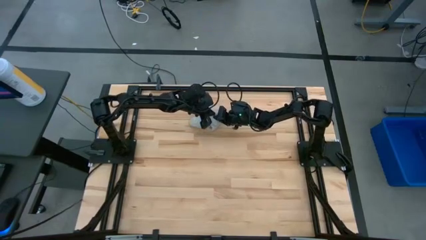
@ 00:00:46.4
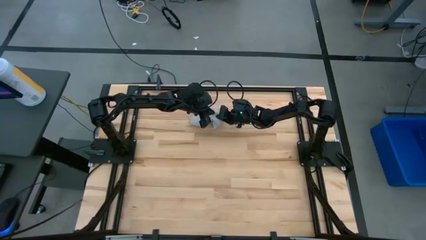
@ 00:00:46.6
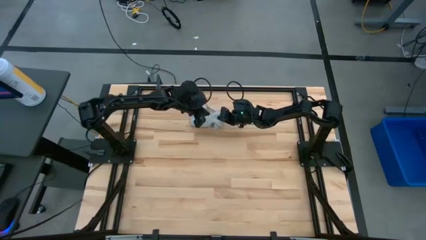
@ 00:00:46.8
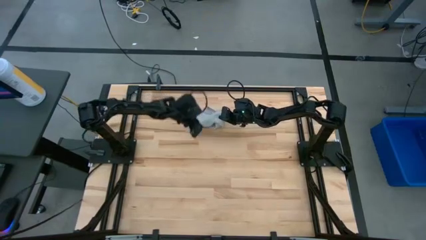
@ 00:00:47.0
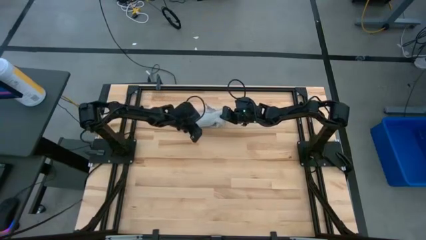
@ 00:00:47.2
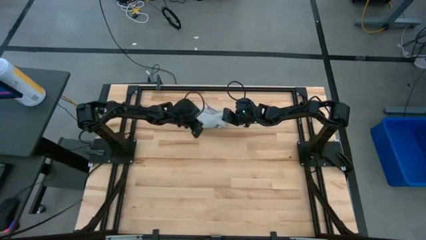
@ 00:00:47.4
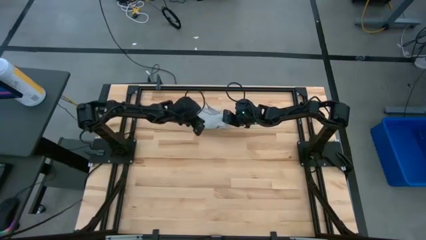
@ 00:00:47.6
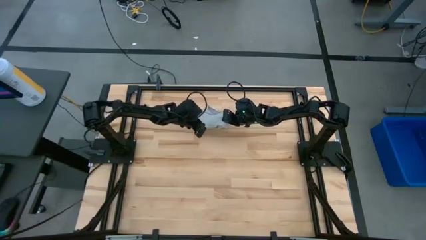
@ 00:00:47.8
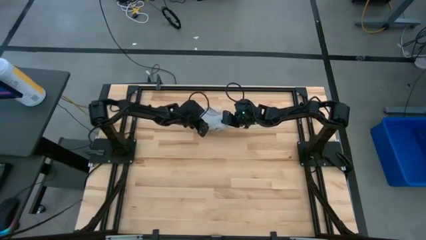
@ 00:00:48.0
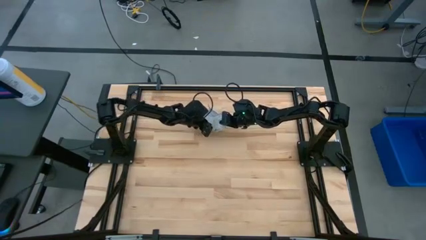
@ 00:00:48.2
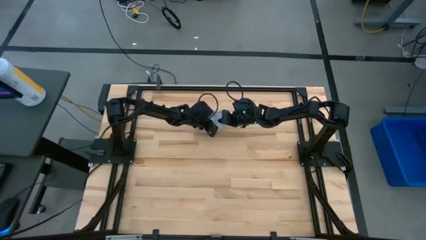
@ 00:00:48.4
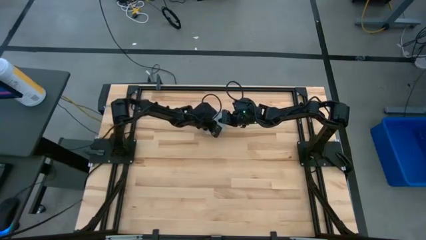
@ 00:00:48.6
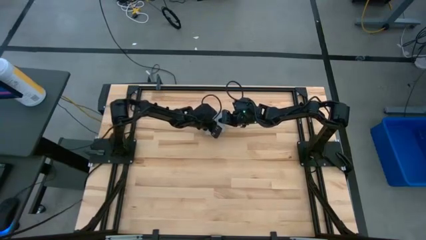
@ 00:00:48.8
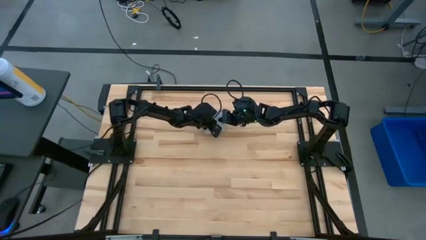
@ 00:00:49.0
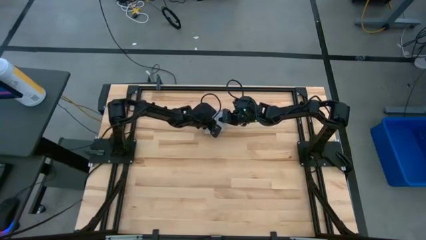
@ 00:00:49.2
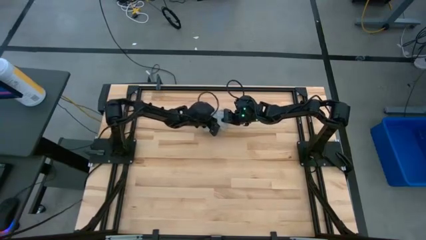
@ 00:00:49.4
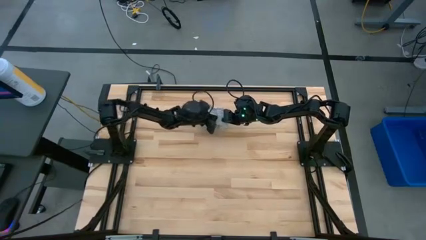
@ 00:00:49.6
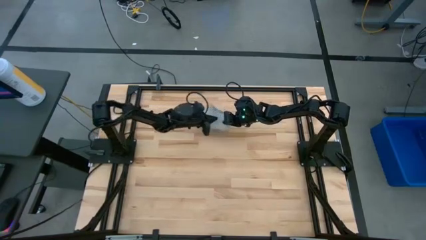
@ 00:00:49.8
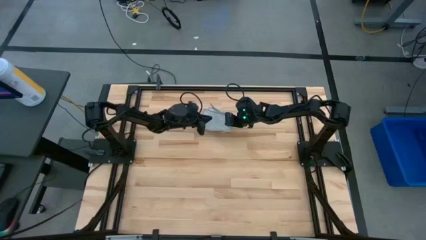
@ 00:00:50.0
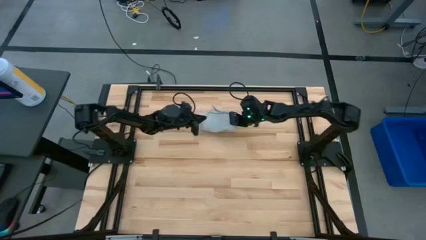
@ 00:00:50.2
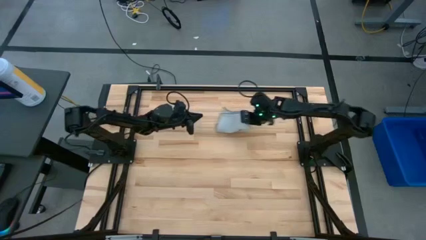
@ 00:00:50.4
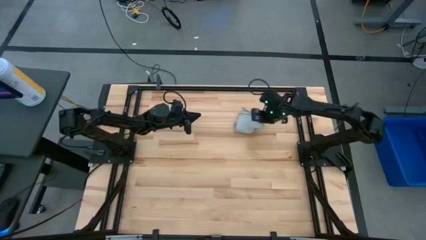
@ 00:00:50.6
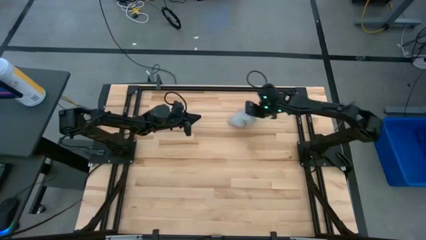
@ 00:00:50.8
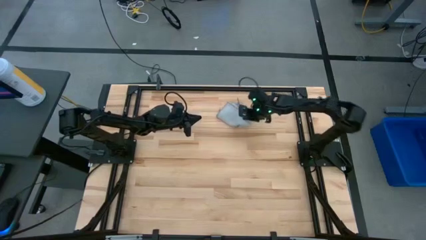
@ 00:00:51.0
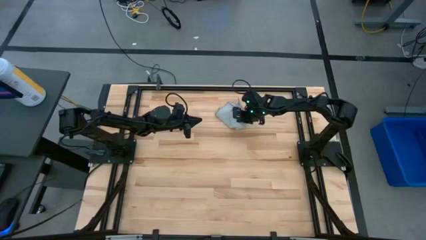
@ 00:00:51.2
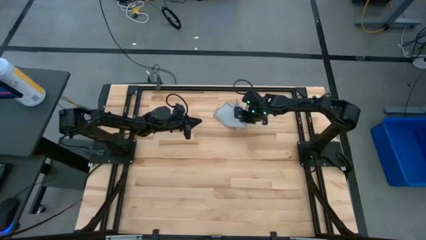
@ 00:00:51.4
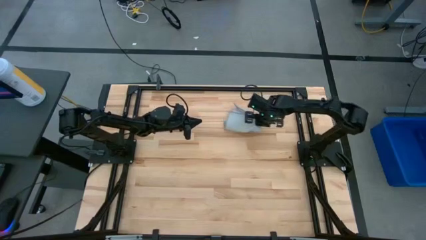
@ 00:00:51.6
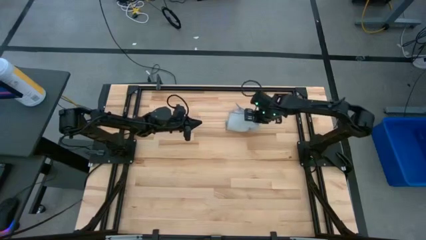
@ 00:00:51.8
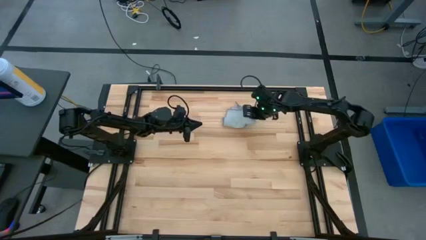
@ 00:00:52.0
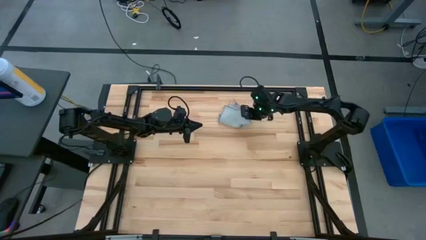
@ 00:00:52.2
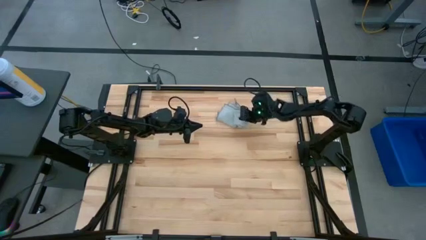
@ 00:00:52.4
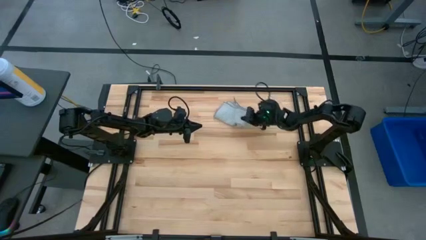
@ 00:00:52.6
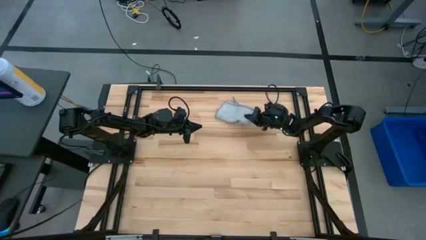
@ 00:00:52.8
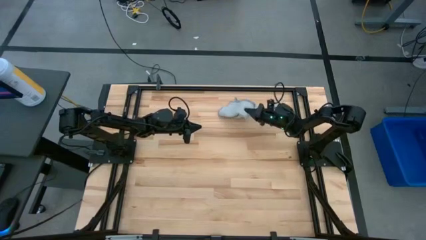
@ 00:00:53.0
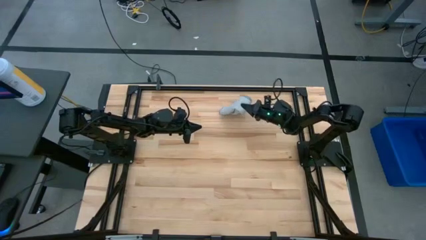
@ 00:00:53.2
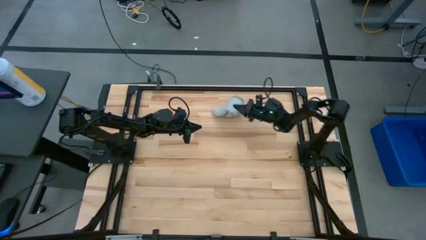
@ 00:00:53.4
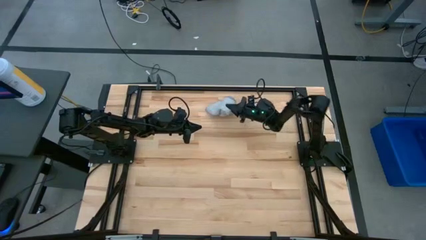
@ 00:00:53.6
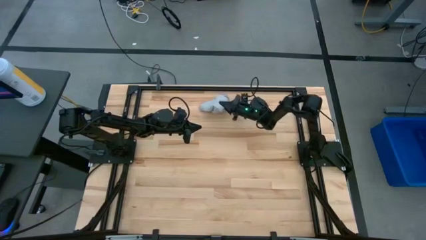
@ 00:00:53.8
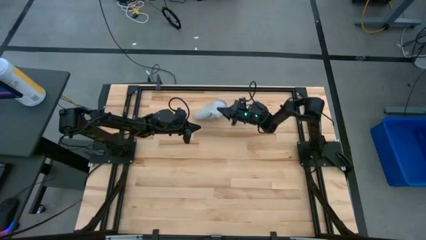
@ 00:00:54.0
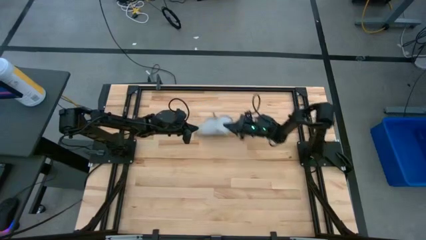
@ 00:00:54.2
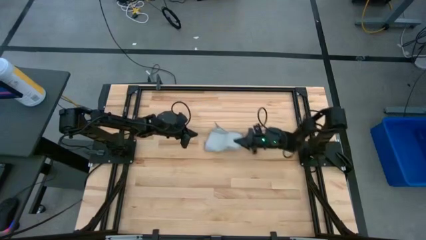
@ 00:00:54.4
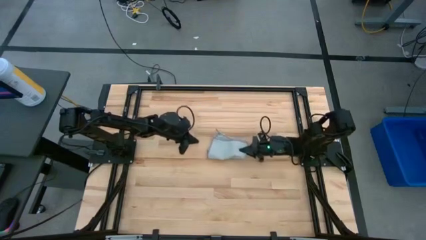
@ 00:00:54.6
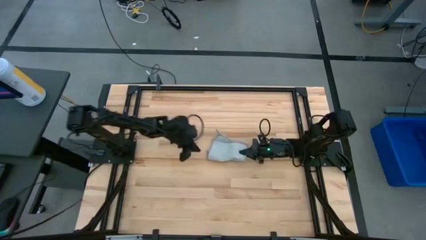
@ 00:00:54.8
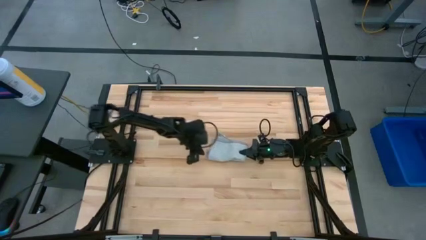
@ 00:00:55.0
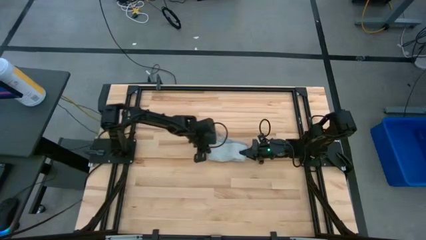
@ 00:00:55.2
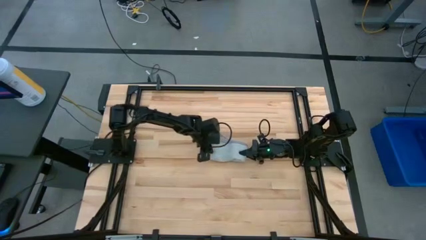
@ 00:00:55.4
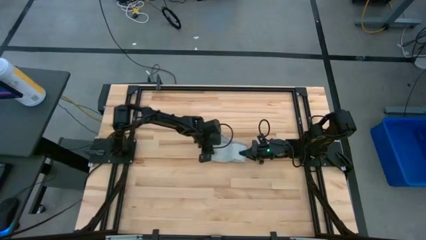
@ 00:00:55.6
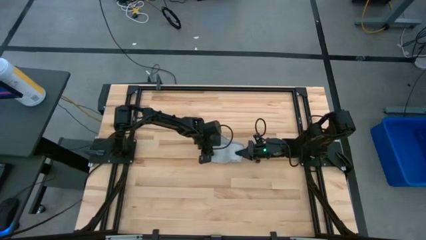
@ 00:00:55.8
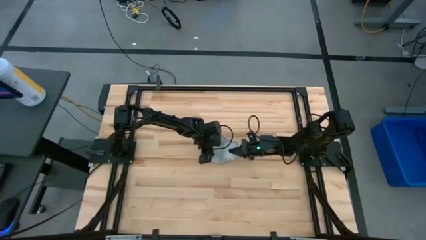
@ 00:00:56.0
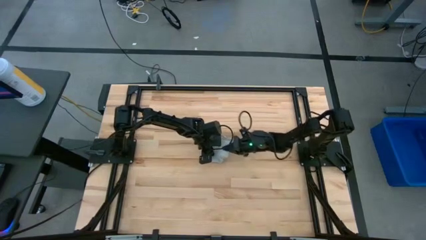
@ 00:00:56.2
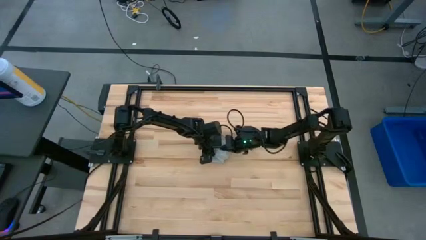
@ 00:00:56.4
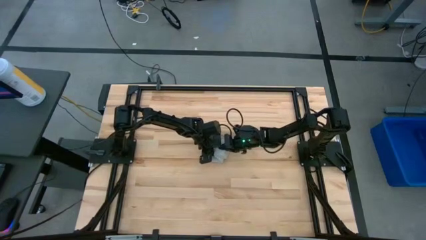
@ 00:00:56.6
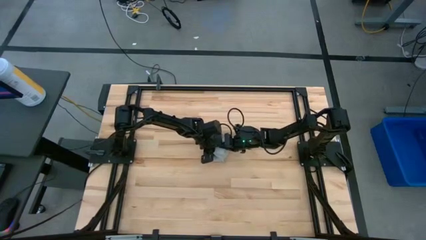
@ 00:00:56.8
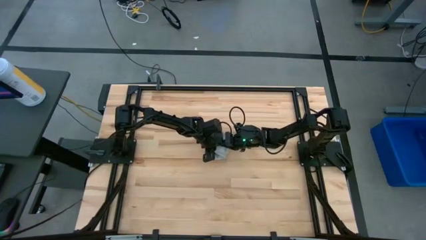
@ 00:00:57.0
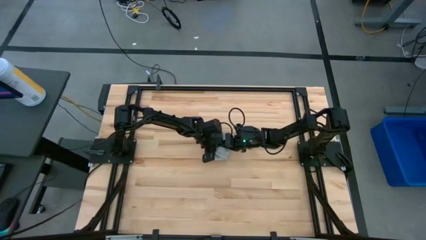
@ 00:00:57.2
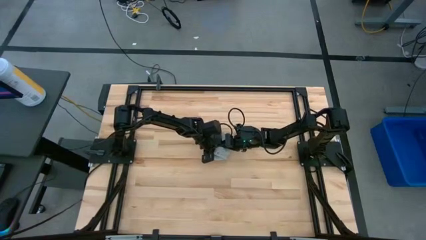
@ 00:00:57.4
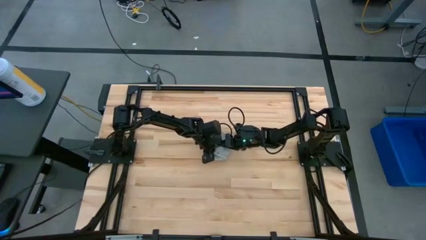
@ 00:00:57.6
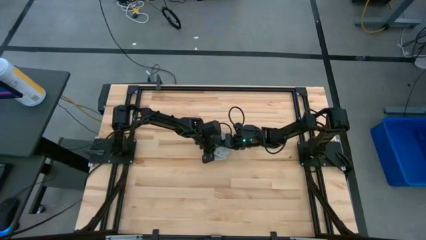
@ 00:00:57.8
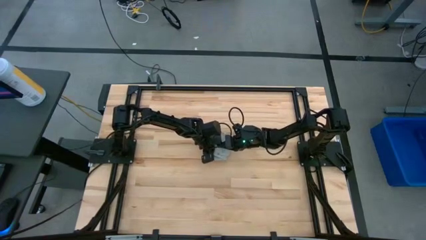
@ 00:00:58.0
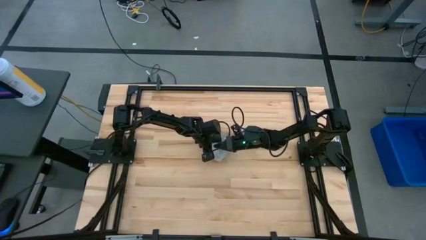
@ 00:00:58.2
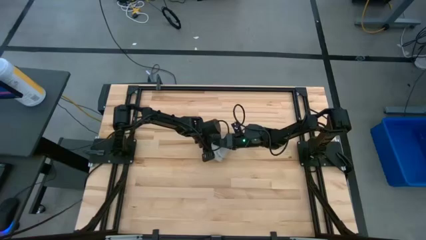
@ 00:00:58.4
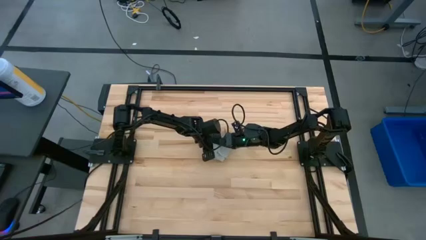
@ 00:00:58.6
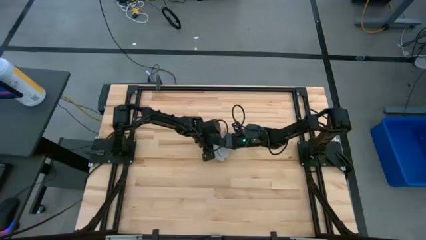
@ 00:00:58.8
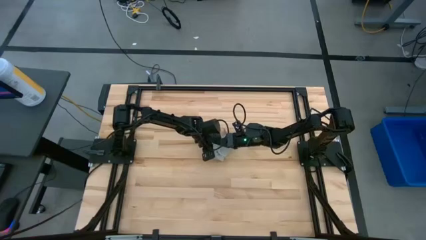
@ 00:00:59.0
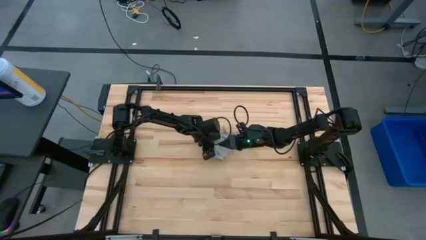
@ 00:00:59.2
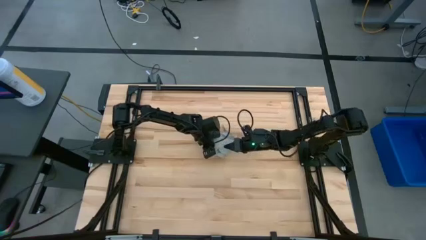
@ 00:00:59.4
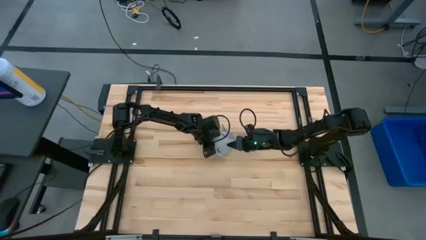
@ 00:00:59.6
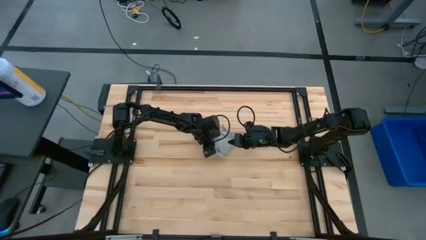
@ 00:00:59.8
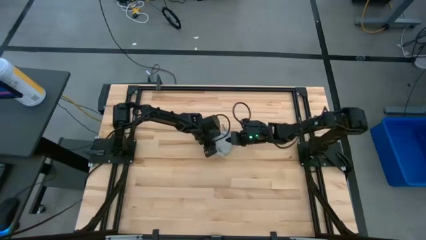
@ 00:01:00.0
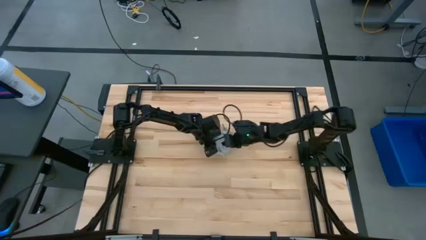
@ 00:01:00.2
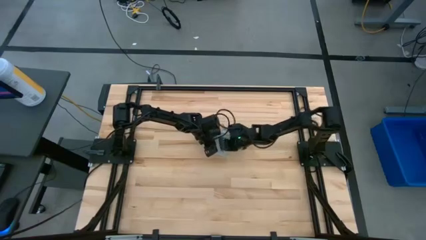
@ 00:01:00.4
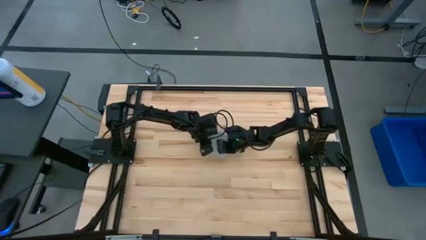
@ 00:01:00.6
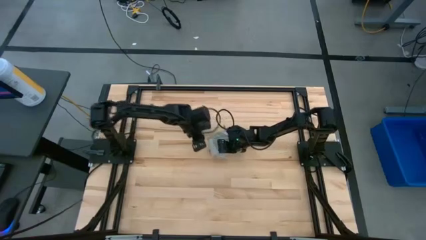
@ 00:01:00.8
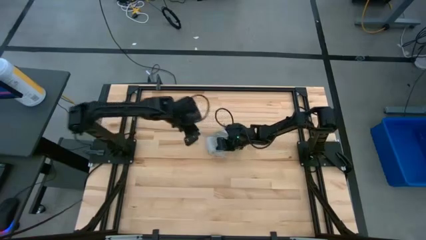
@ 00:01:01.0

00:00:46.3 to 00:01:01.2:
Task: Fold microfiber towels
Fold the gray microfiber cloth
